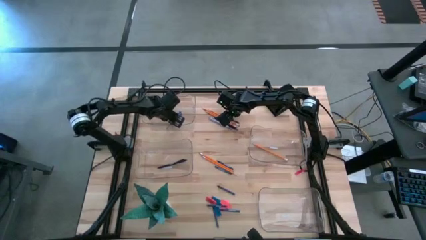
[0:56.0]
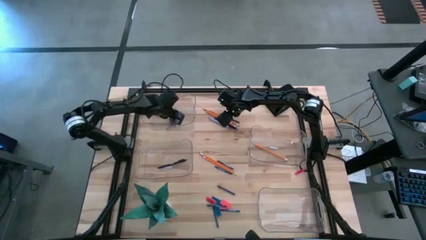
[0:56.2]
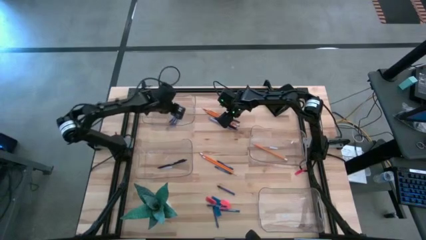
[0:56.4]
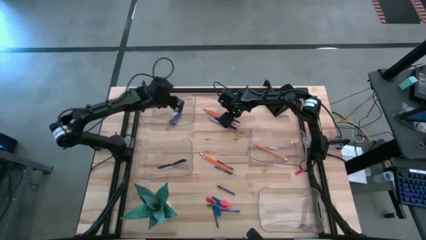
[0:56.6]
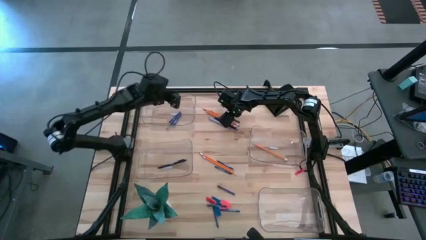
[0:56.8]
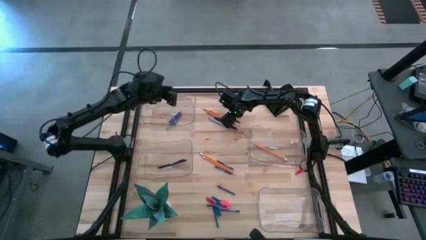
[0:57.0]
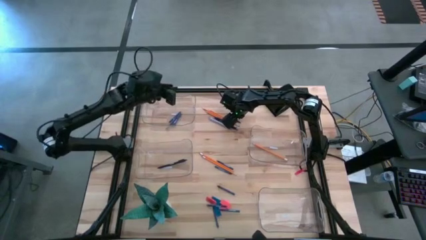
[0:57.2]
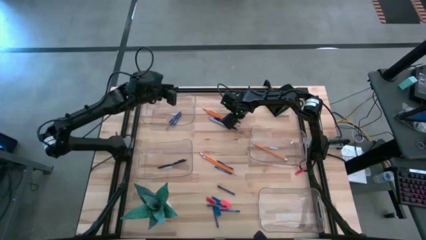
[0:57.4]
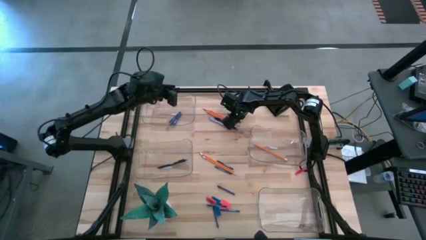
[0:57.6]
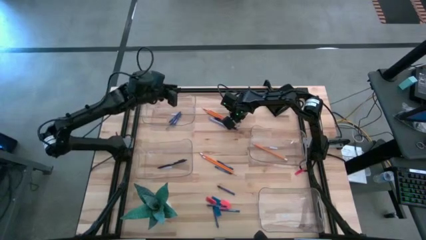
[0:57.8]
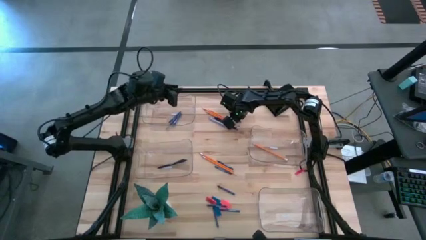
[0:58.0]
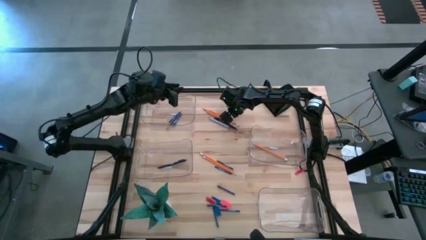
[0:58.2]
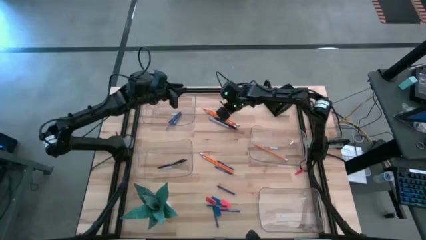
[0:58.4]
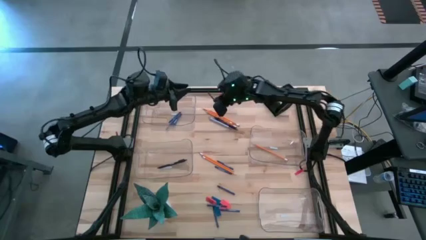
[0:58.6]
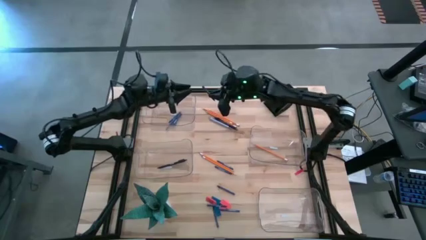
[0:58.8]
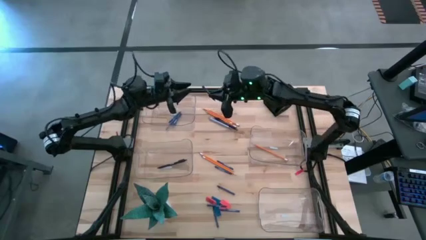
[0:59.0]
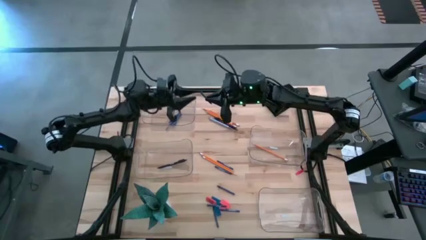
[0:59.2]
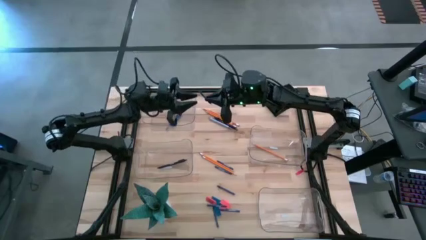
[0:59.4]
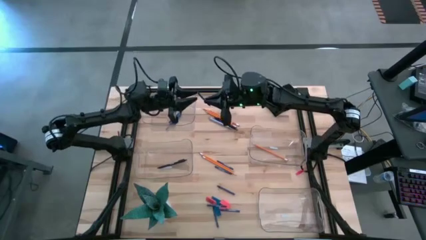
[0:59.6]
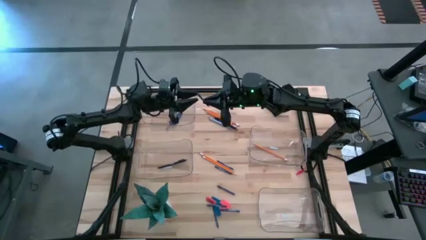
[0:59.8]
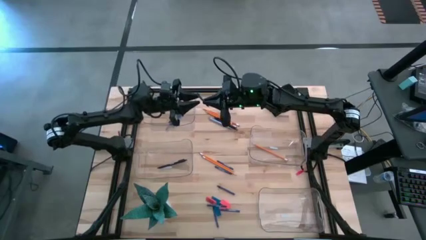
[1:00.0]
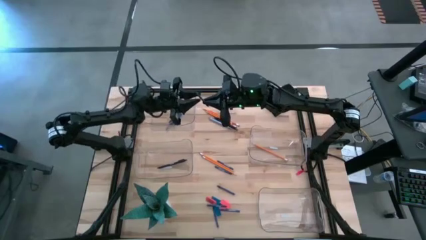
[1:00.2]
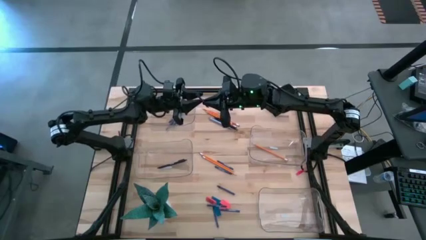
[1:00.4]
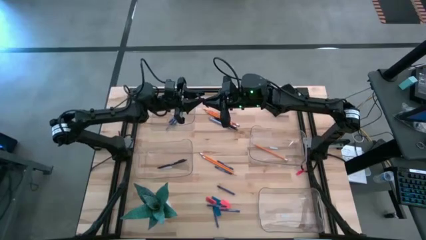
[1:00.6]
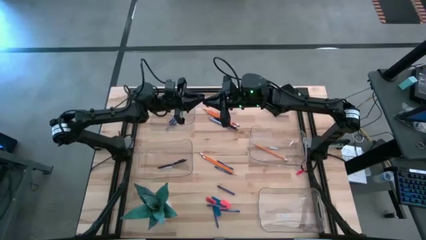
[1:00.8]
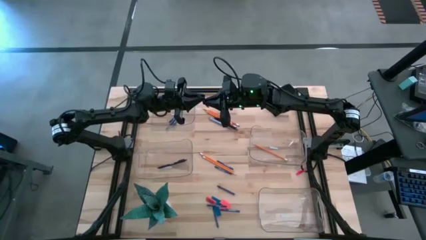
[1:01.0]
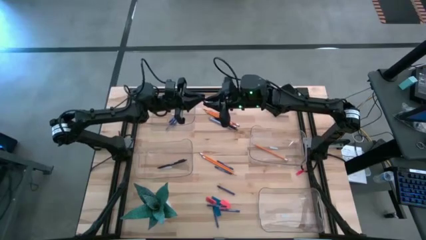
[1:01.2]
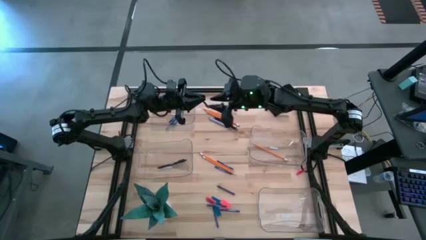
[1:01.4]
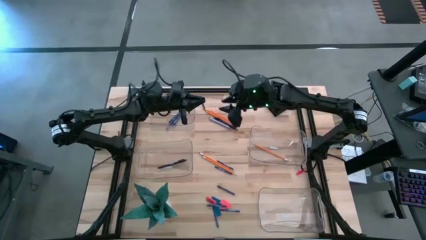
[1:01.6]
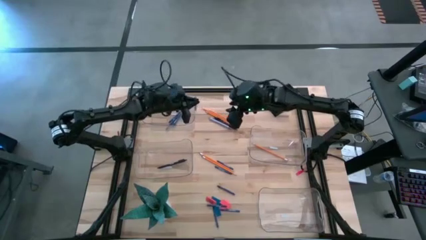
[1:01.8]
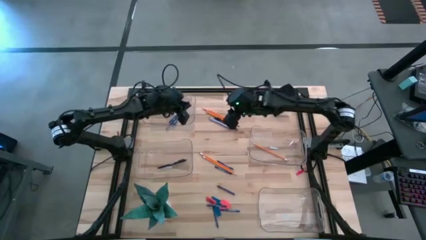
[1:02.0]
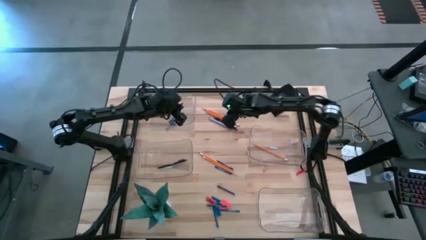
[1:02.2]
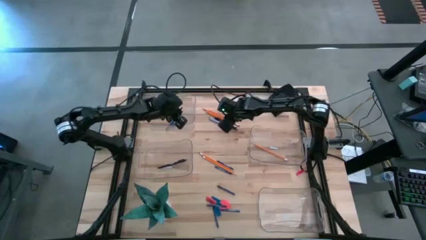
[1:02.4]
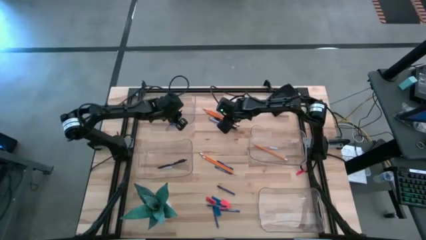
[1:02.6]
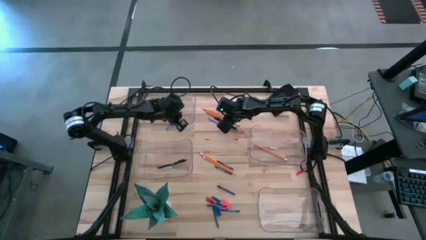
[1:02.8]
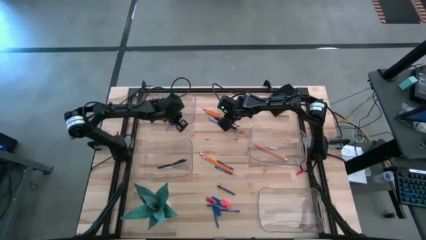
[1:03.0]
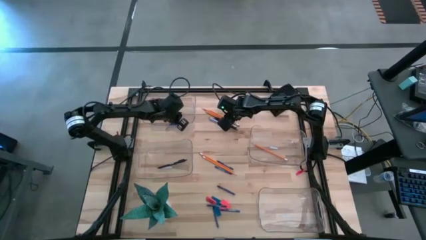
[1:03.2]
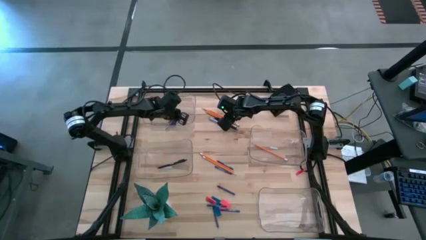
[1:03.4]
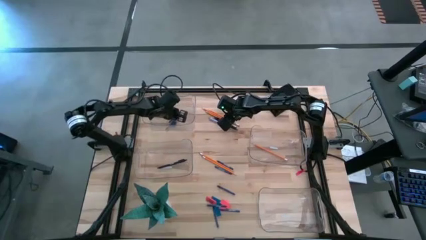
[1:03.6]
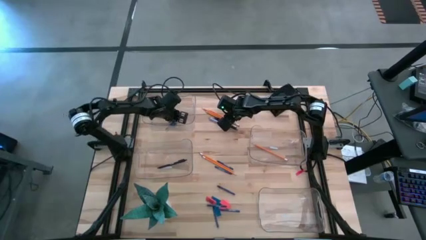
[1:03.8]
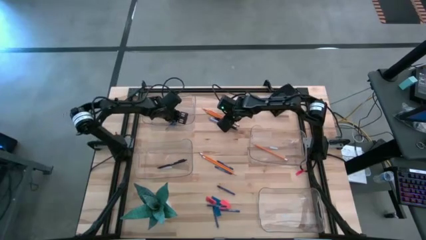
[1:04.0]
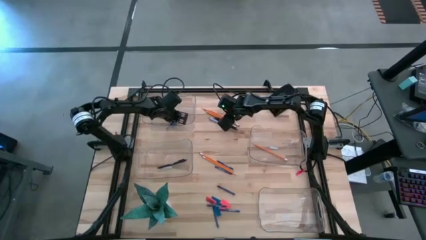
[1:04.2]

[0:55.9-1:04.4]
Task: Sort crayons/erasers/pens/pencils in bins
Put the blue crayon into the top transparent bin

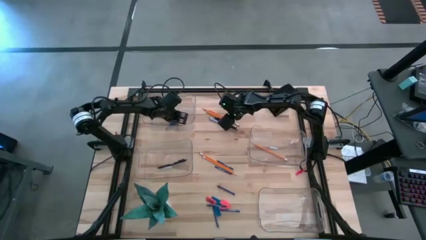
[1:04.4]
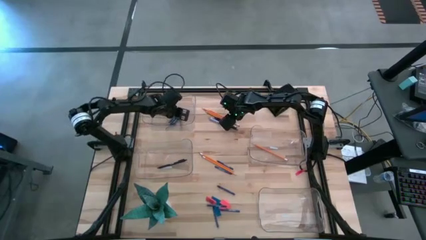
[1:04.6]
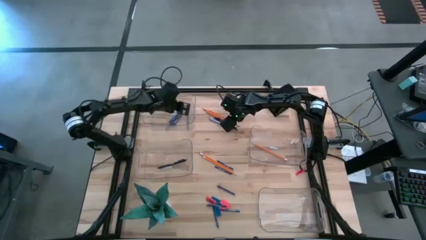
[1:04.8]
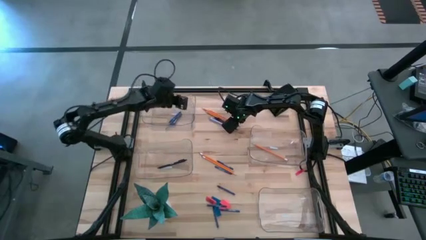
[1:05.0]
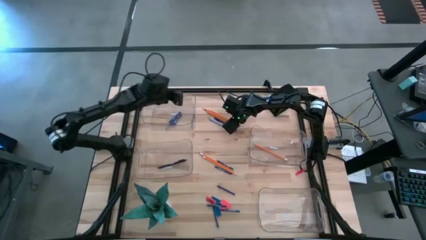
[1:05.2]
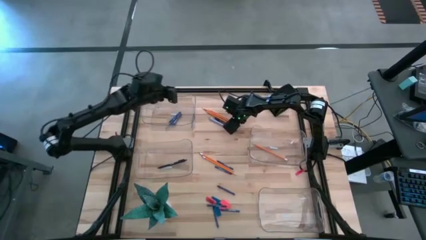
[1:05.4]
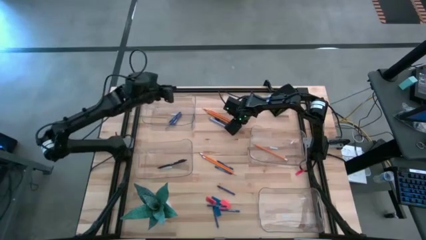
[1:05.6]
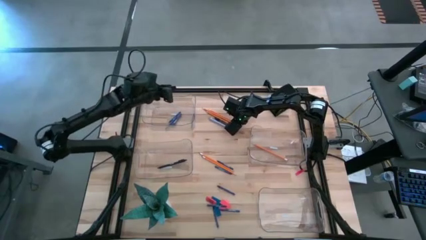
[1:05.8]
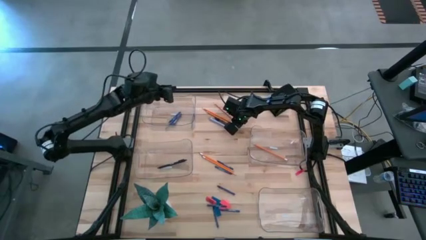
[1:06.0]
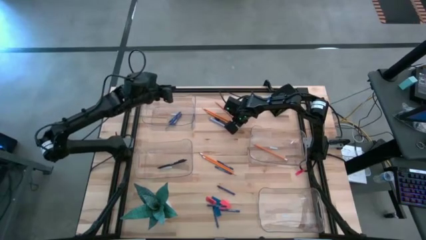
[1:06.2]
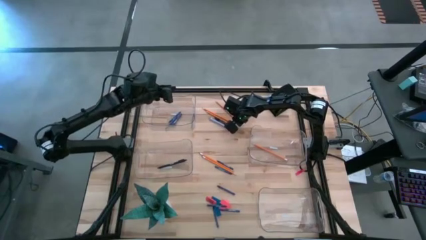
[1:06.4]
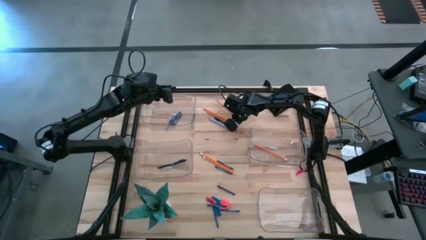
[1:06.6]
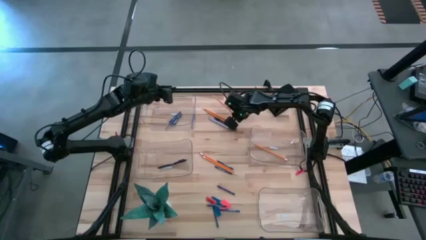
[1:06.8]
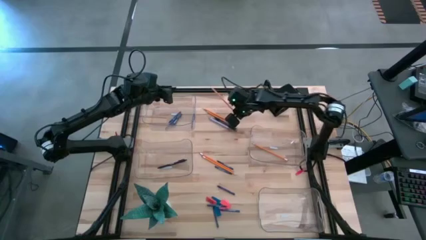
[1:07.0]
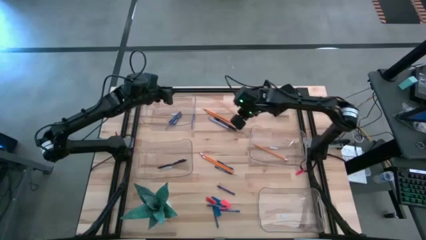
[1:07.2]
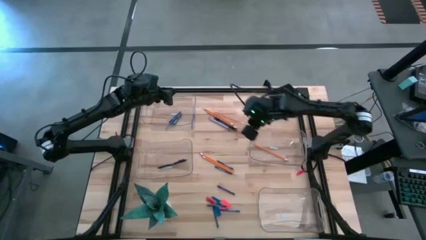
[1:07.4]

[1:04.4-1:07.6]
Put the orange pencil into the middle right transparent bin

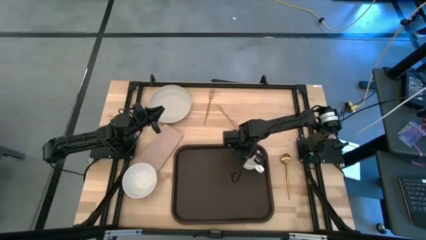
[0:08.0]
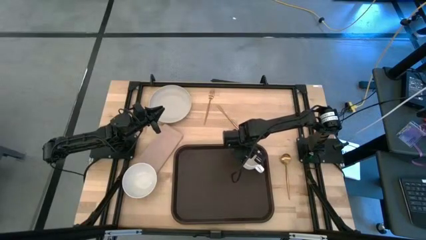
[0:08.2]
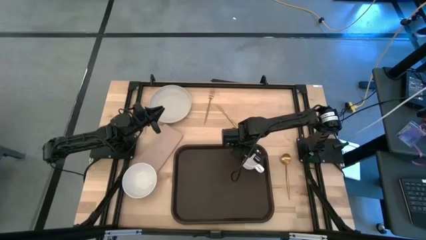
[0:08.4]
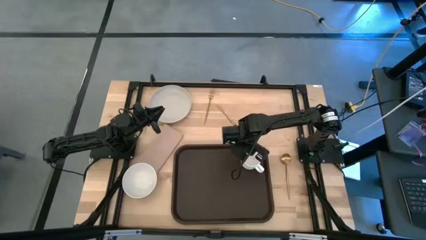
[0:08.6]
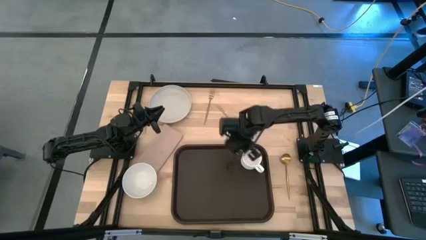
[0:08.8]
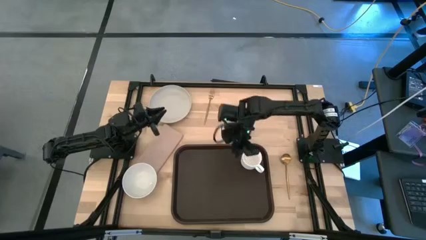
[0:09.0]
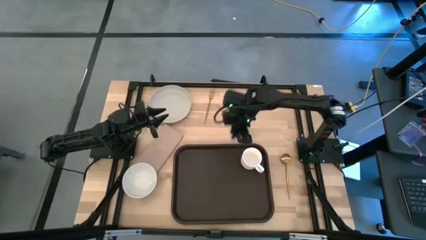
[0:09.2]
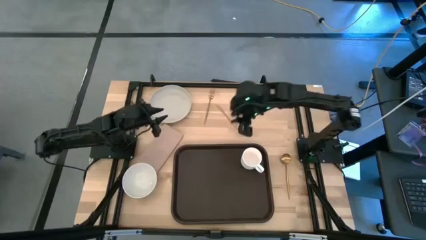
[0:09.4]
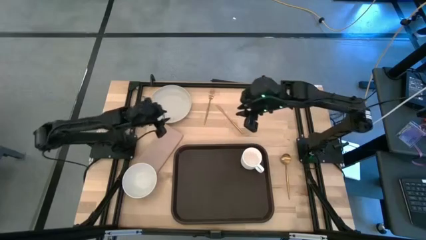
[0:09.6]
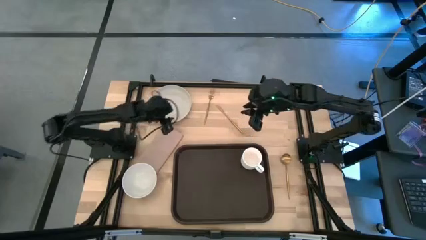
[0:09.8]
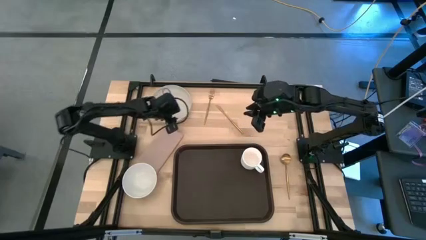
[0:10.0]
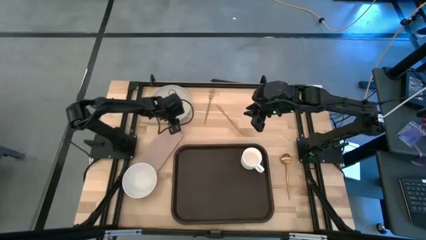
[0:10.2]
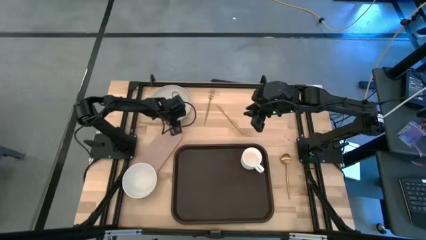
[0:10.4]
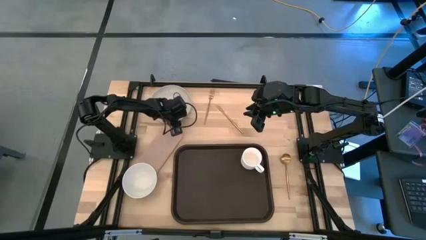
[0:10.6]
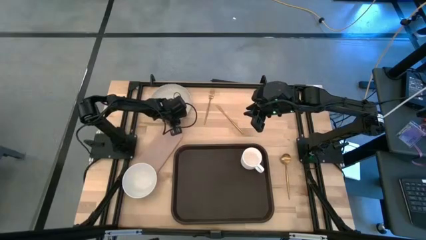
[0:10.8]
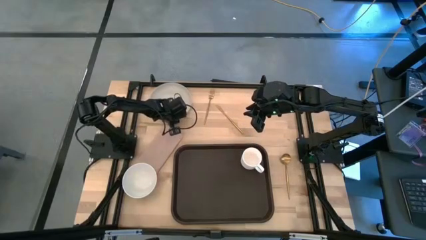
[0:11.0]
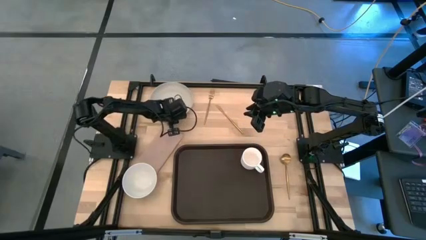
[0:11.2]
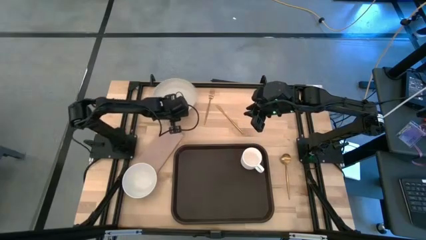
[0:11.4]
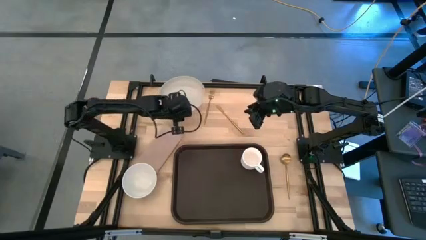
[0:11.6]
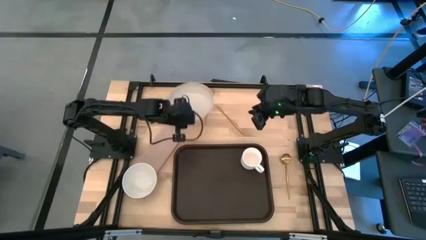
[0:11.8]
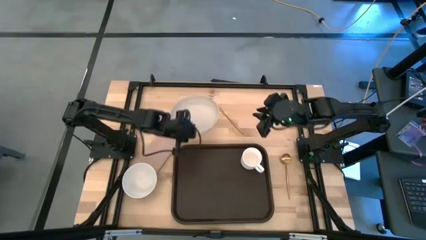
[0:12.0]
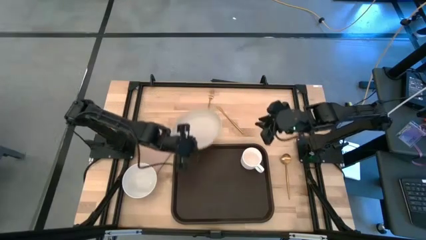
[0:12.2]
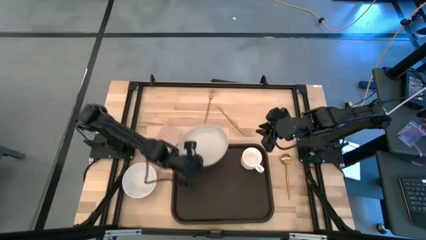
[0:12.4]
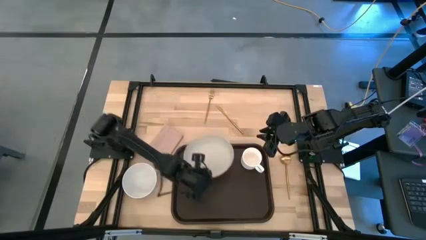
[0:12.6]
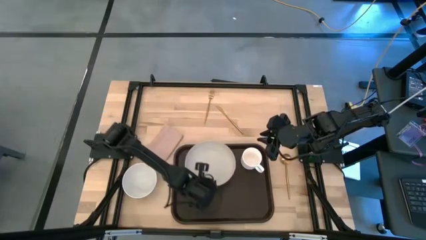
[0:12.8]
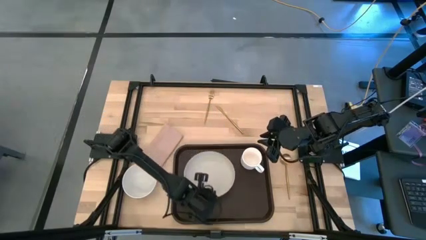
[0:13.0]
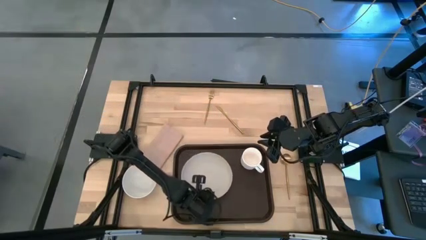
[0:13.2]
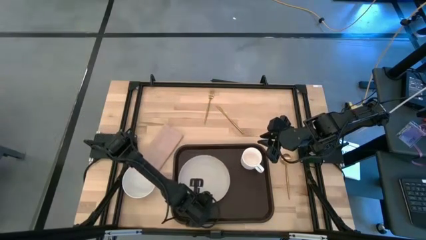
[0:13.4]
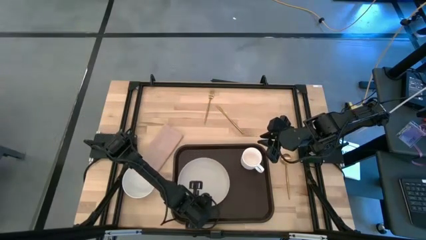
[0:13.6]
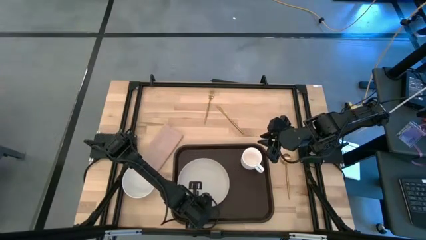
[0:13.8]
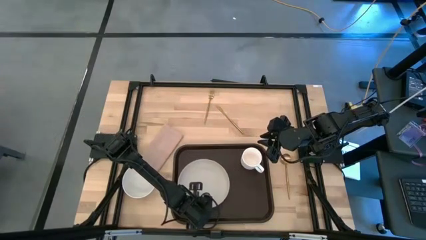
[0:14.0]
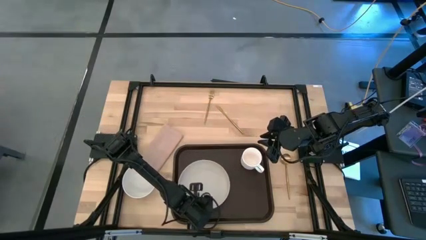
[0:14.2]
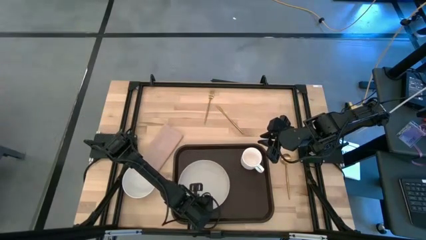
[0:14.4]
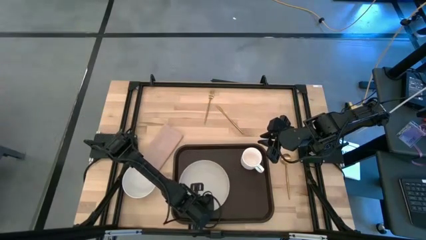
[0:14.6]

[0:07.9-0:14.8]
Task: Set up tray
Put the gray plate on the black serving tray to the bottom left of the white mug
